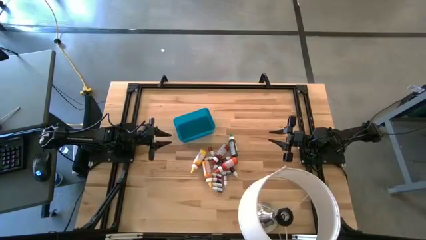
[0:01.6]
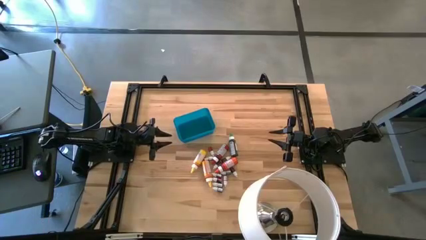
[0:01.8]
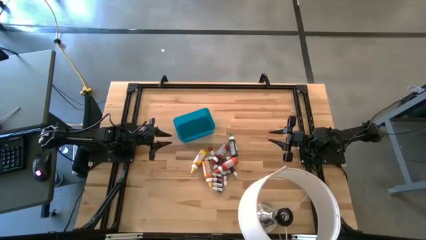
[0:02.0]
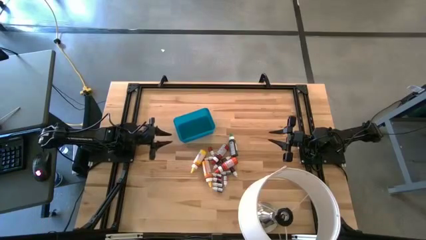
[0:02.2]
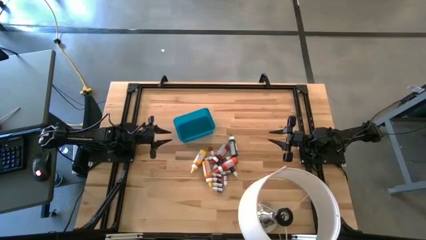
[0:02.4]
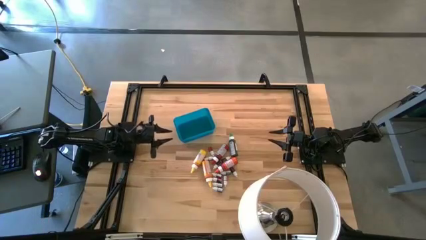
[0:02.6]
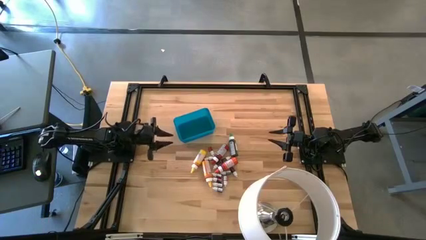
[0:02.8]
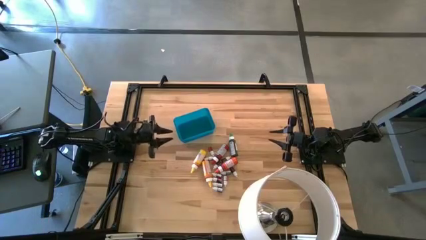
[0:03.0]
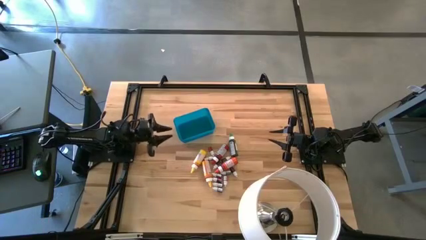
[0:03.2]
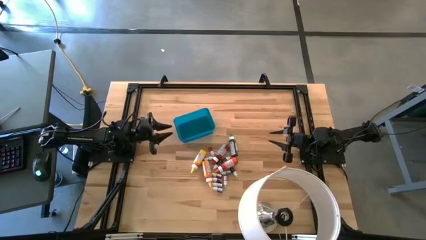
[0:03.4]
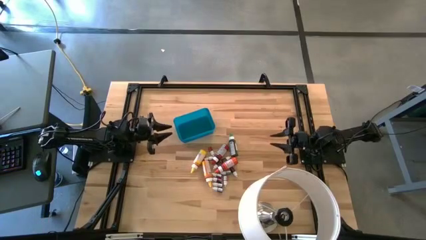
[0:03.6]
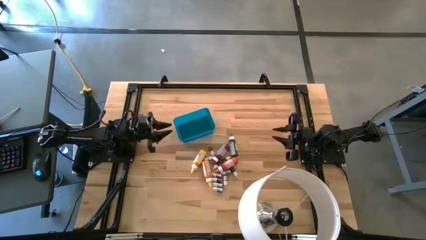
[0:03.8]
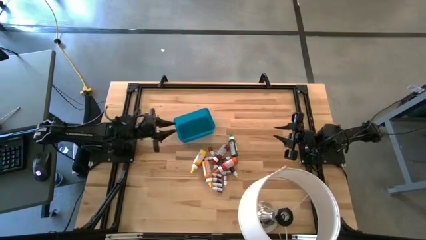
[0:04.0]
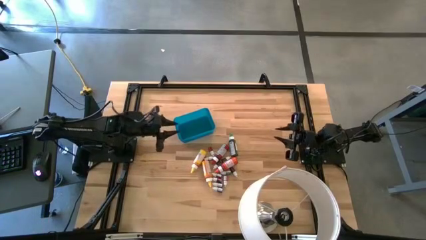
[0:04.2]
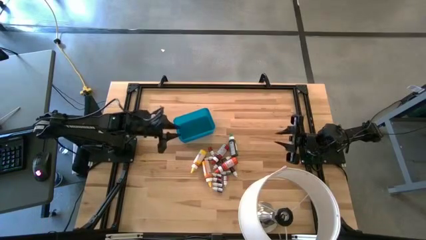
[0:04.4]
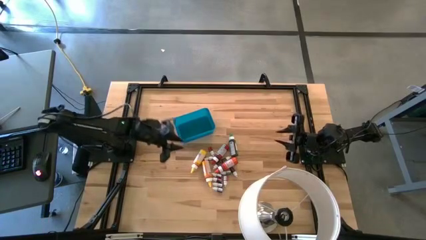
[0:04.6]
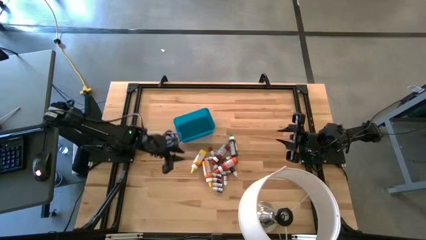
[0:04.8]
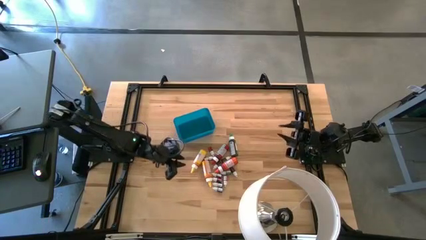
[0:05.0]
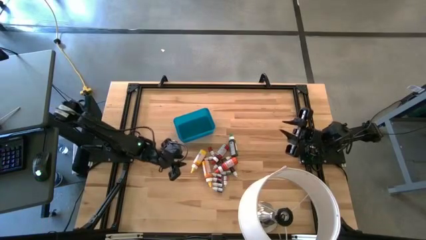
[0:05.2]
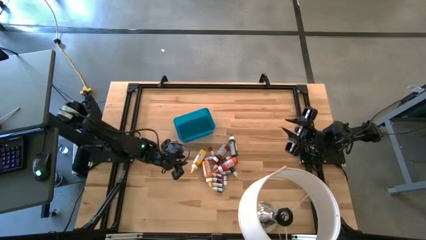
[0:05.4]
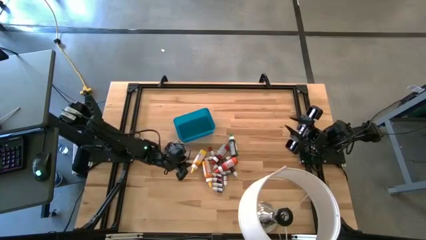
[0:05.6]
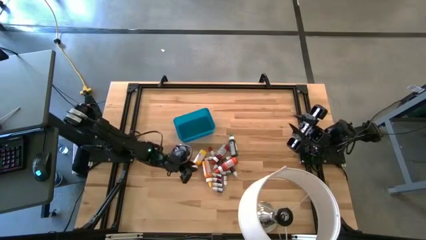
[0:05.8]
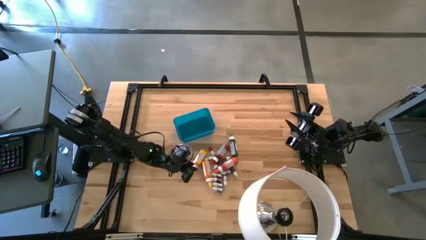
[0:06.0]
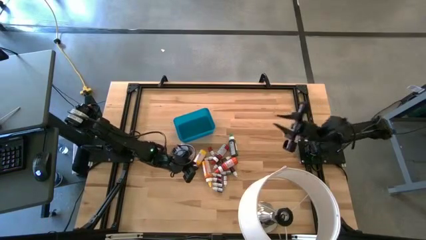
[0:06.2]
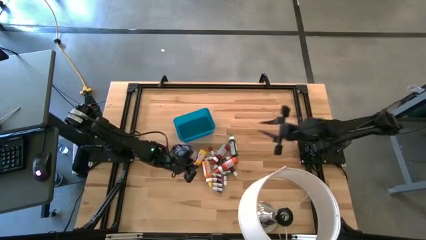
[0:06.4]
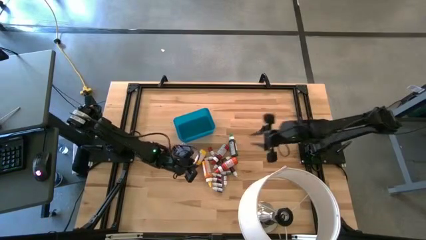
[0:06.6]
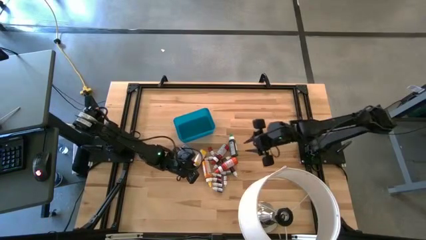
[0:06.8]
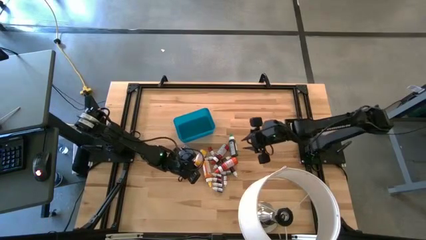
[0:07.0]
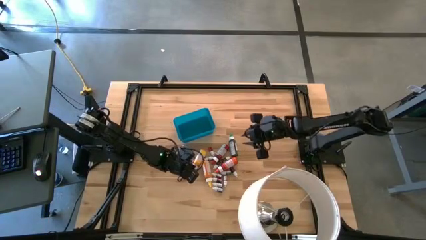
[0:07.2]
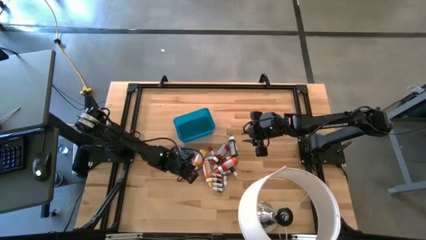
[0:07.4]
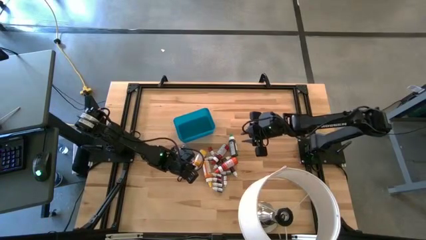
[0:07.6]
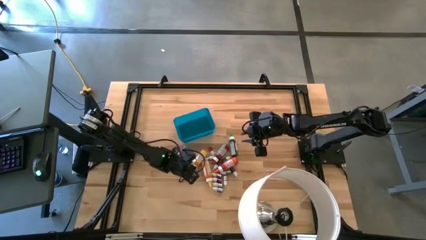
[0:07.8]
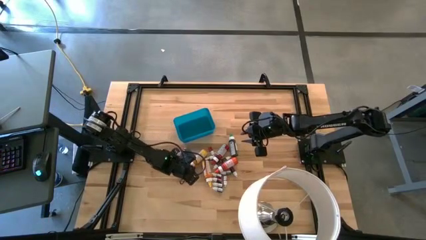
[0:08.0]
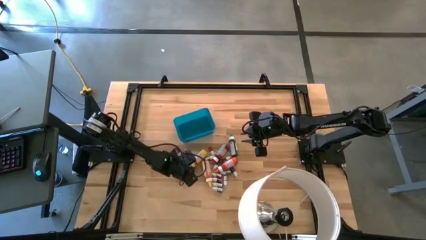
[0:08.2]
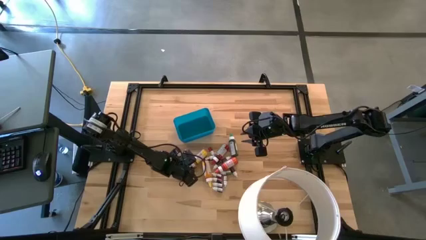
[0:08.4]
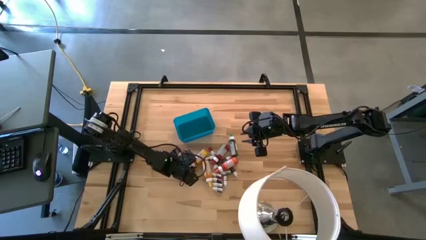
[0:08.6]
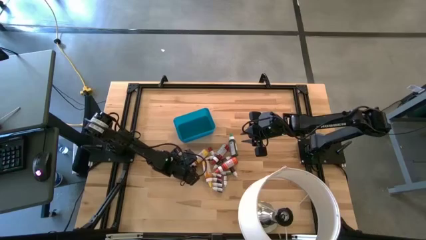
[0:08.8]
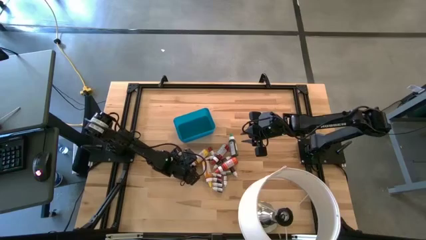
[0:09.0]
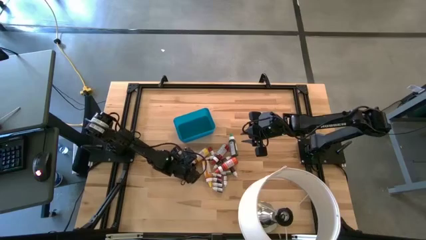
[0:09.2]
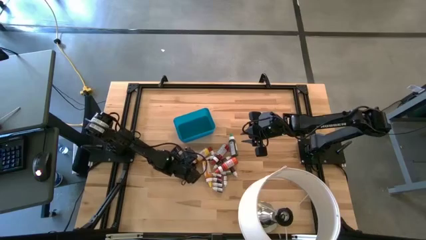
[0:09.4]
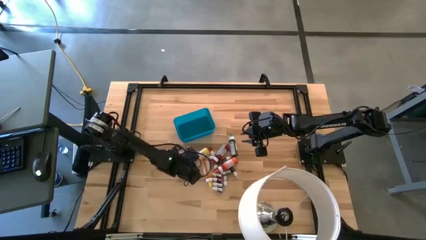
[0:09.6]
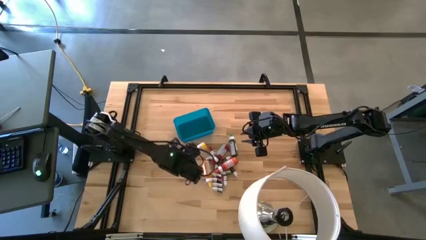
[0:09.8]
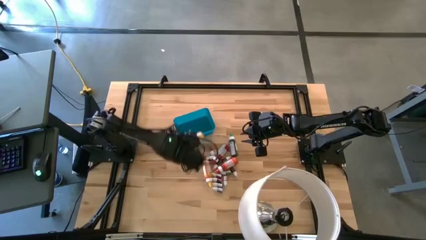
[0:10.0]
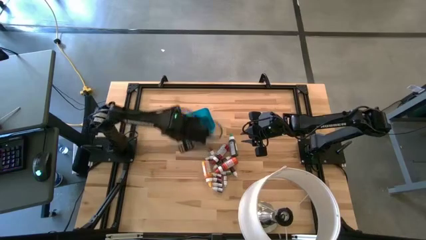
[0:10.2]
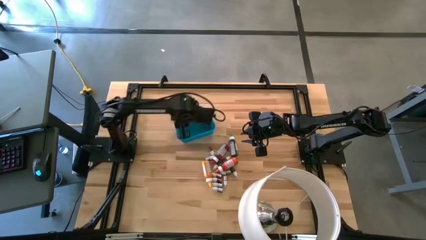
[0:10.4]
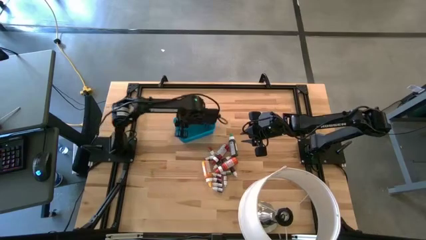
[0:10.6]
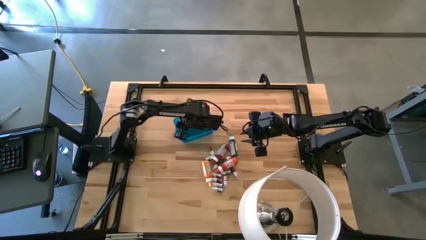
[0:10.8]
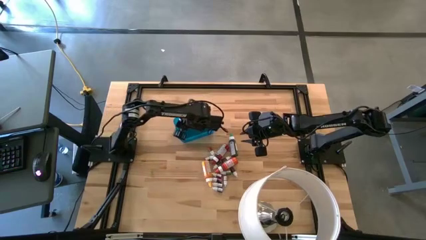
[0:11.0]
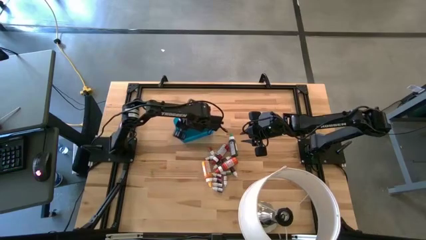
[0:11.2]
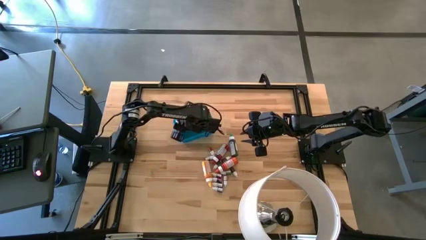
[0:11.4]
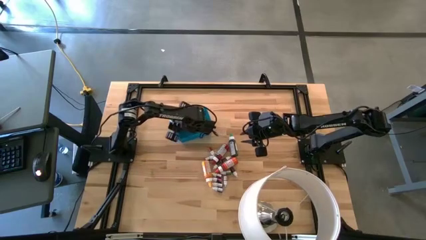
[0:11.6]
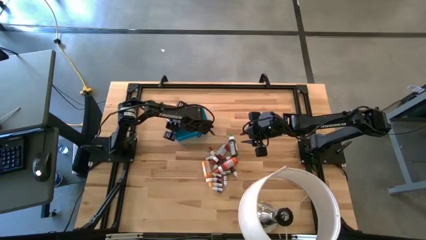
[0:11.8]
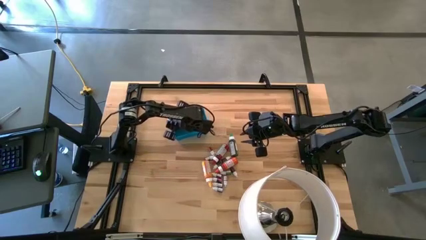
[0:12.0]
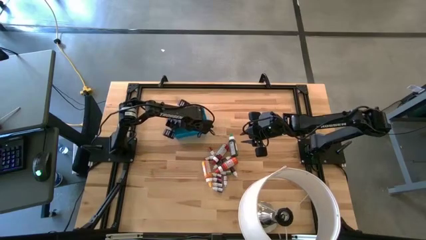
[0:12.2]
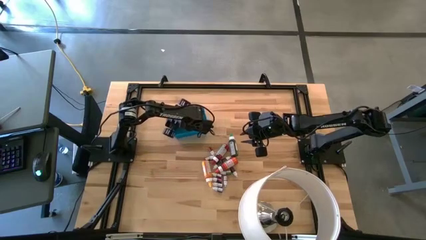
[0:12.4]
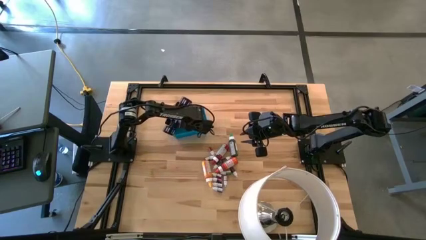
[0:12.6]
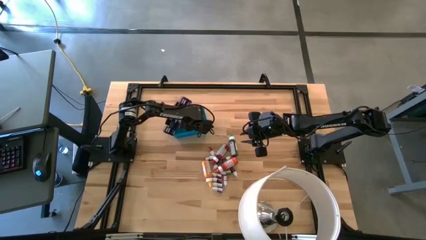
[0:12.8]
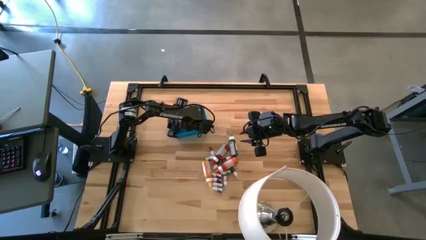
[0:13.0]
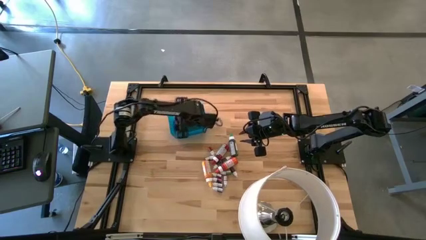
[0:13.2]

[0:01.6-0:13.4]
Task: Pick & Place food coloring
Put the large yellow food coloring bottle into the blue bin

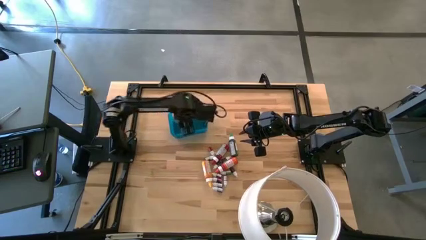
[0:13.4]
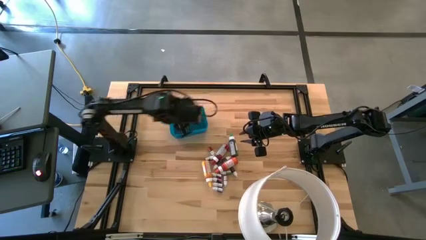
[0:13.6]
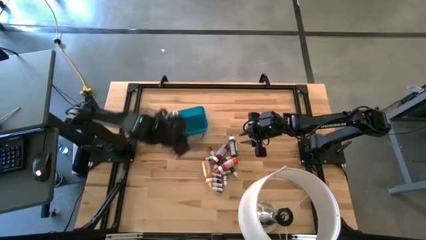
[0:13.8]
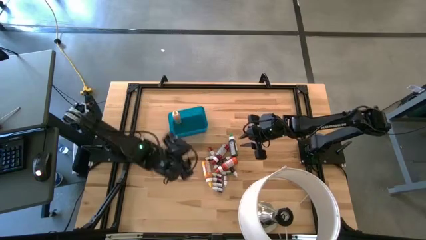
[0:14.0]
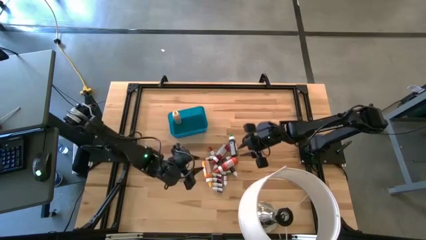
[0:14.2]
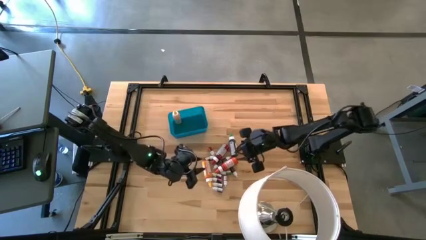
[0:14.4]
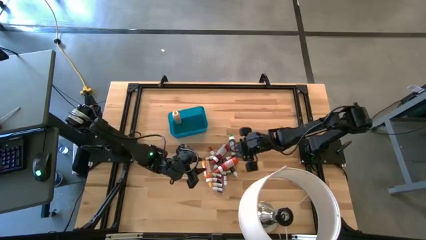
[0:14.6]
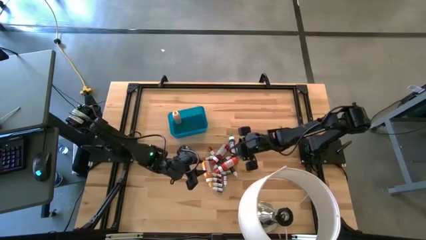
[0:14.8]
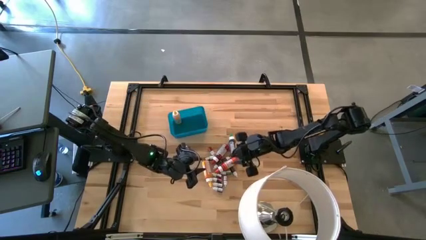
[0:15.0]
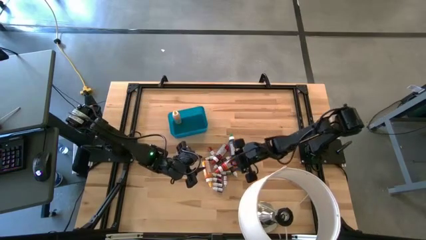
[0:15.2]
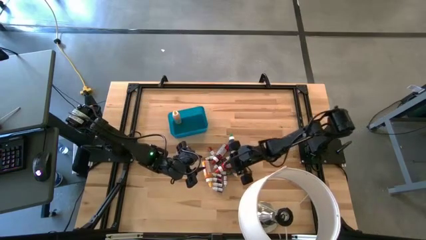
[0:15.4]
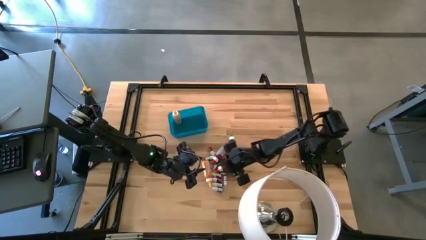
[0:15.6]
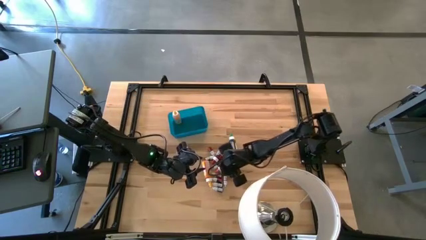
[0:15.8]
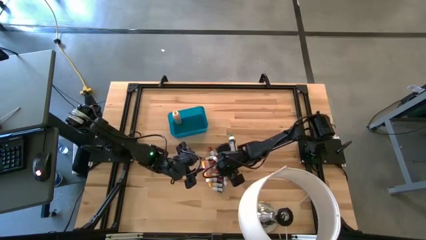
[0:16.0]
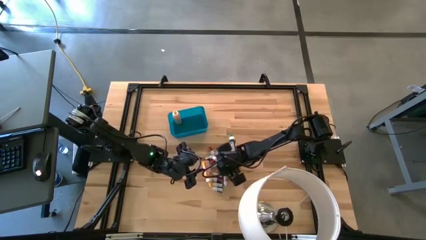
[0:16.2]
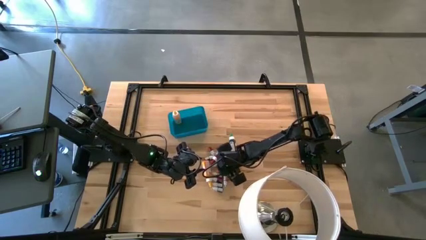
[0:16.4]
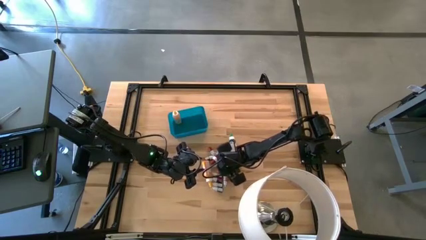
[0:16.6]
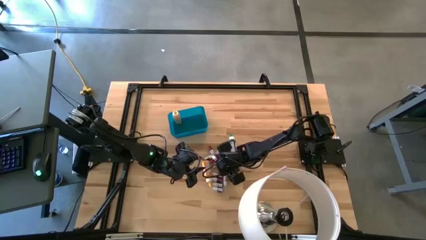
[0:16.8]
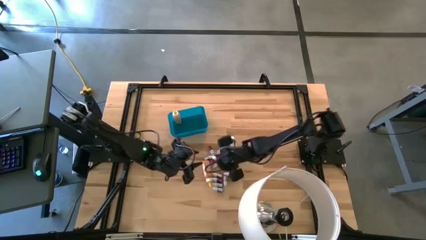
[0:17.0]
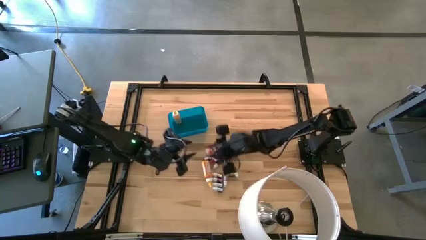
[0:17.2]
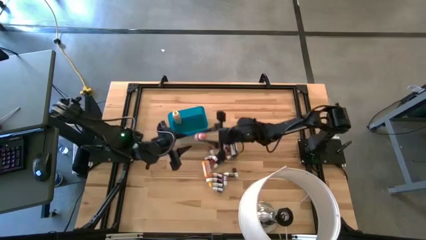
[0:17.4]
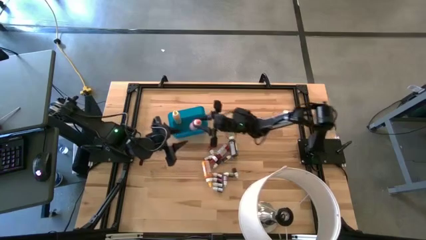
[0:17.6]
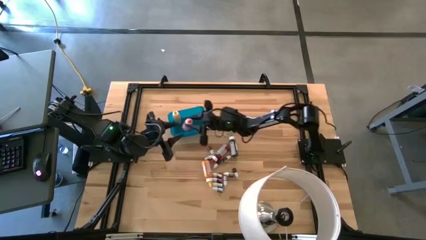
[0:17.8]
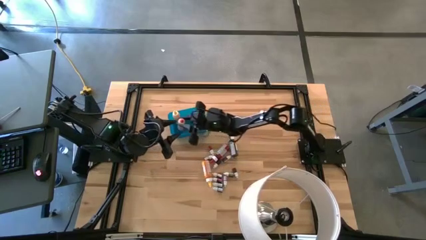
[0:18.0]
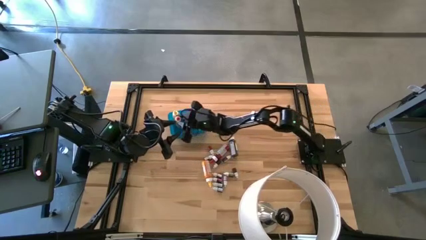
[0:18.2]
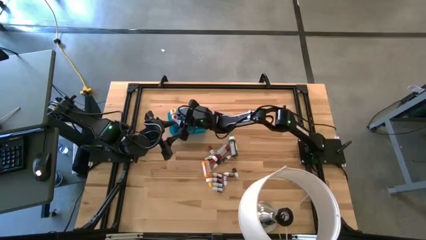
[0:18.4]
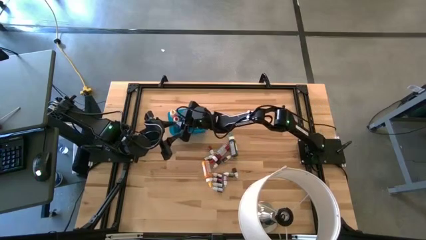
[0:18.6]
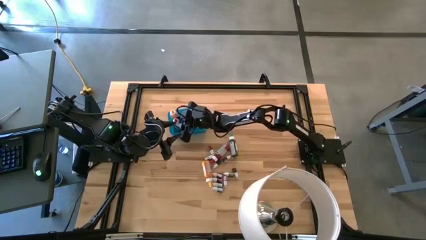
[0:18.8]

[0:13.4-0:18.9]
Put the large orange food coloring bottle into the blue bin
